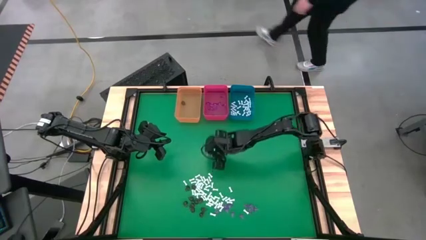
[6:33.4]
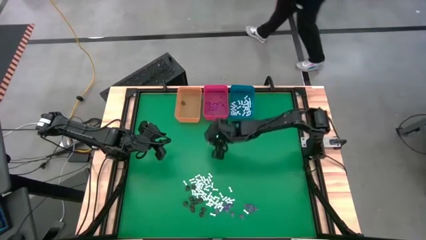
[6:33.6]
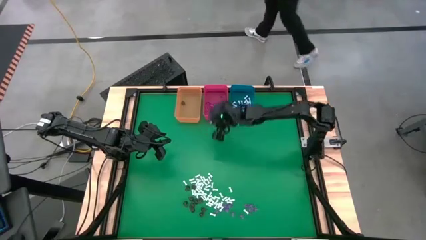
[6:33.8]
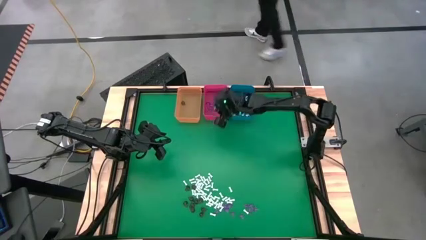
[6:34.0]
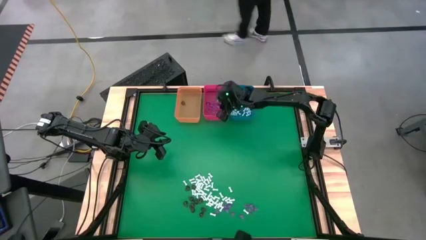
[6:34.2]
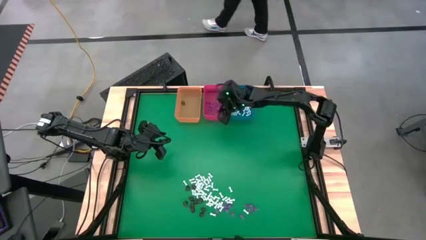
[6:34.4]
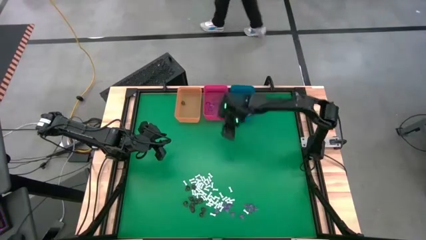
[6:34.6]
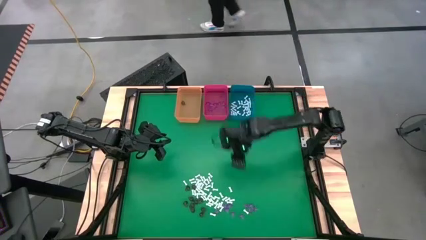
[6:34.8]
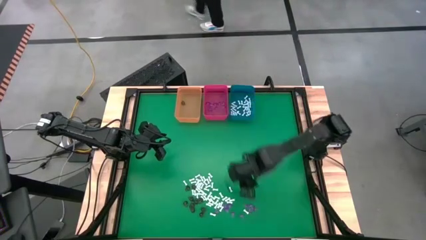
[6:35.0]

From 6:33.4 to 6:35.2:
Task: Sort Halloween decoration
Put the violet witch hat toy into the red bin

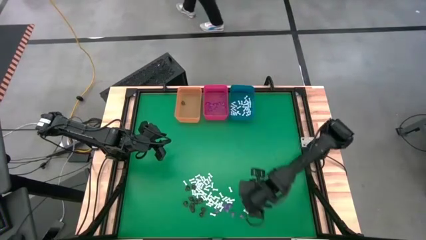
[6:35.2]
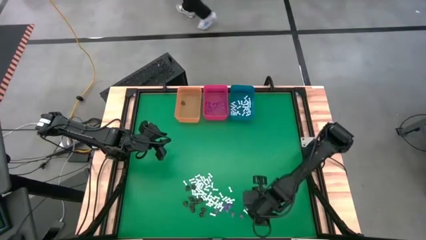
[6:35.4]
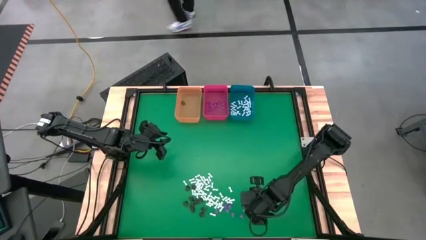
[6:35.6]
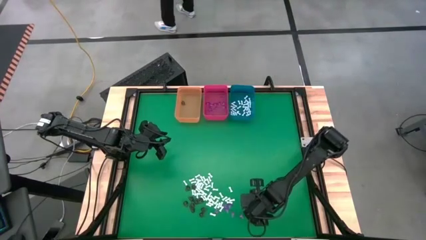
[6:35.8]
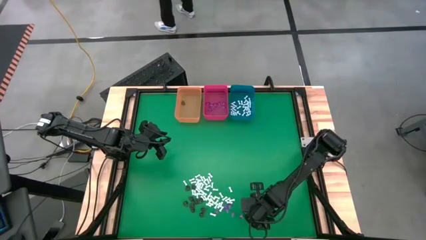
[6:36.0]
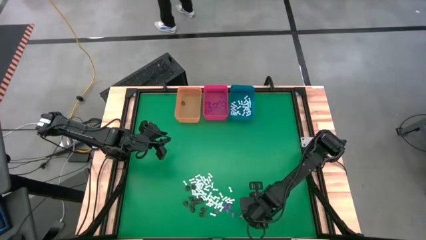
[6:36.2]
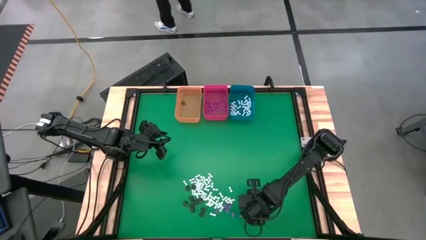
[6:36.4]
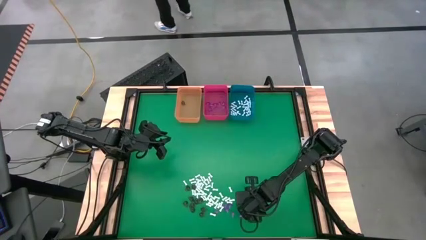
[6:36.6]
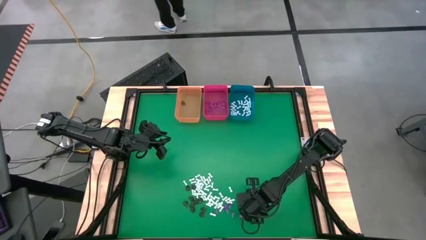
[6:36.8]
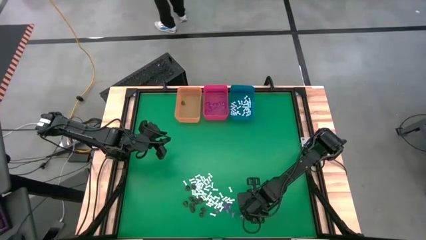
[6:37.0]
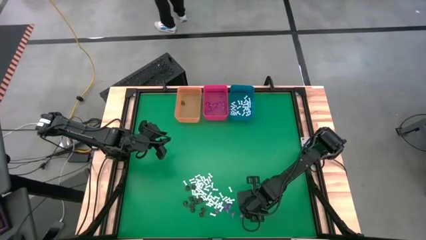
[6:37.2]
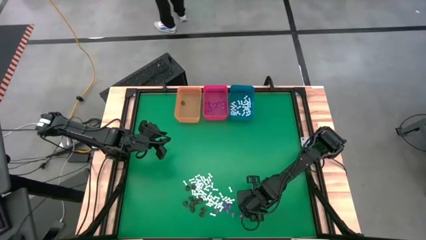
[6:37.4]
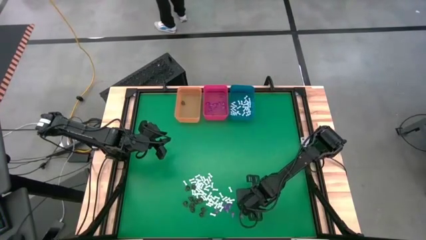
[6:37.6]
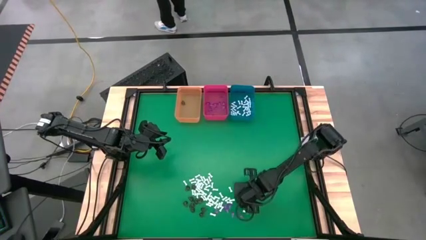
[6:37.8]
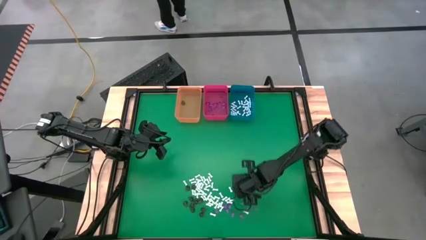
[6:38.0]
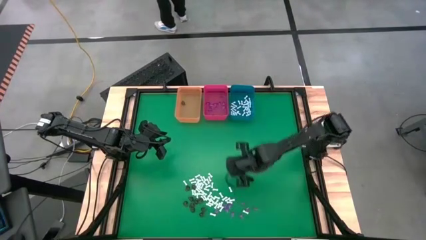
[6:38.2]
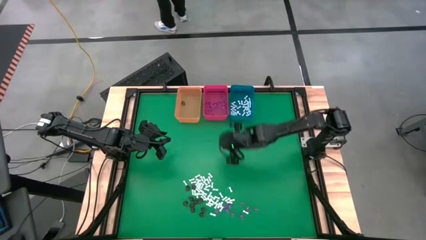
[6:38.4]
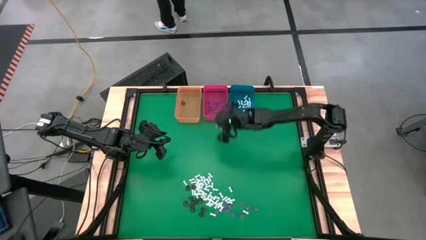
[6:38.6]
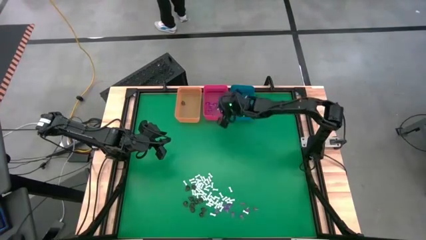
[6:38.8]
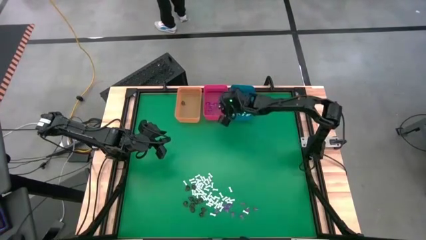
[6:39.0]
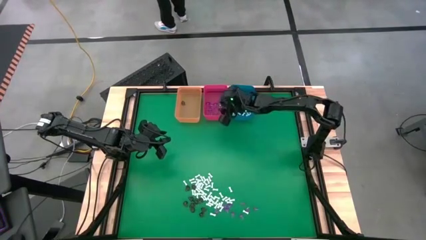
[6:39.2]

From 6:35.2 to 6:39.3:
Put the violet witch hat toy into the red bin

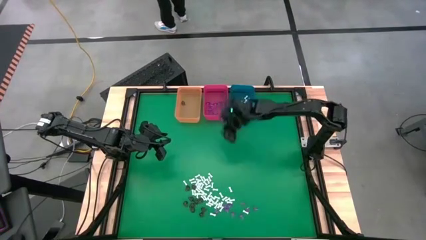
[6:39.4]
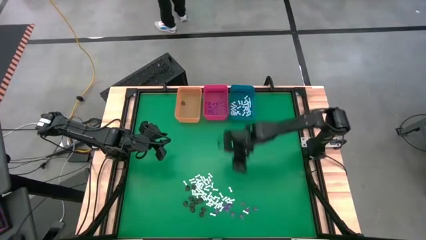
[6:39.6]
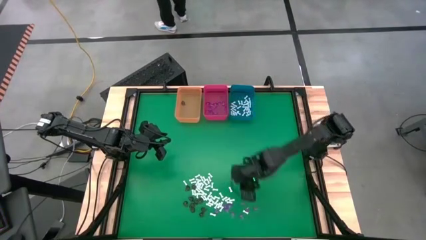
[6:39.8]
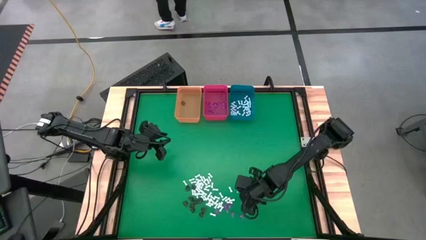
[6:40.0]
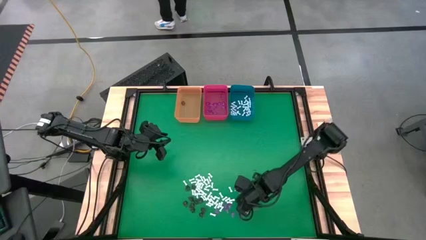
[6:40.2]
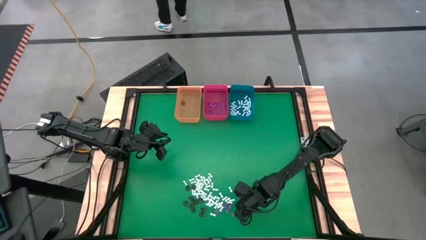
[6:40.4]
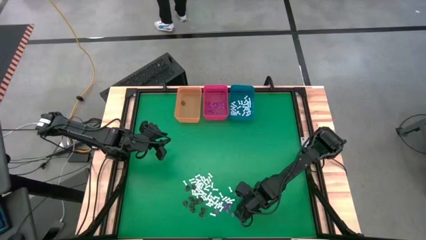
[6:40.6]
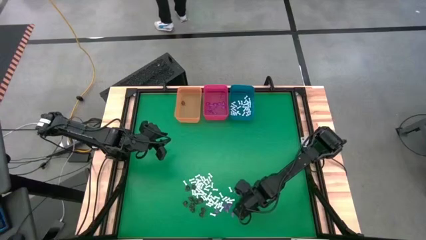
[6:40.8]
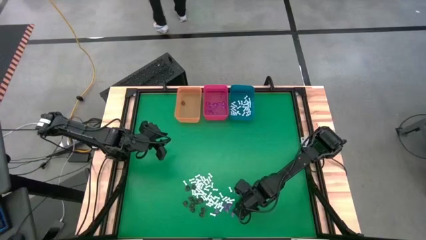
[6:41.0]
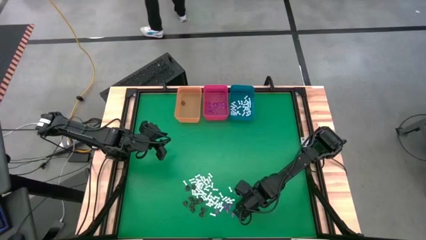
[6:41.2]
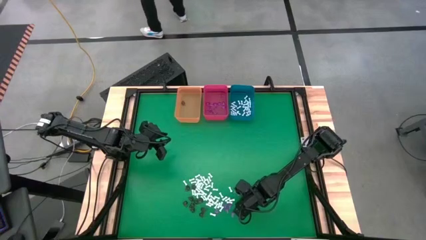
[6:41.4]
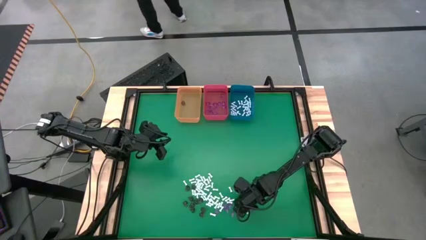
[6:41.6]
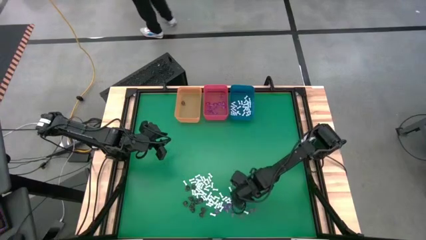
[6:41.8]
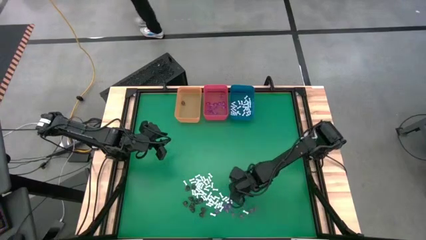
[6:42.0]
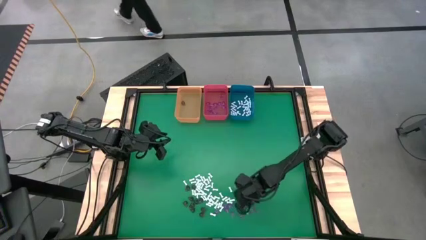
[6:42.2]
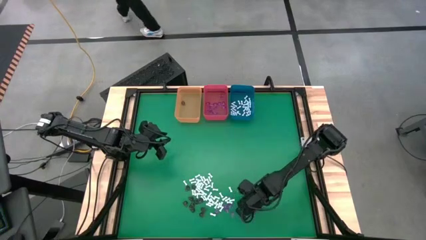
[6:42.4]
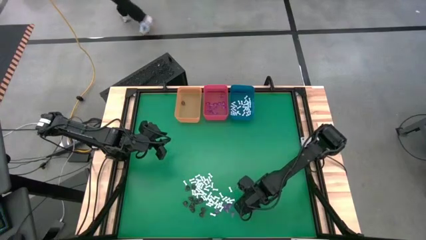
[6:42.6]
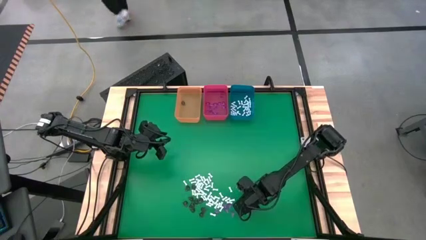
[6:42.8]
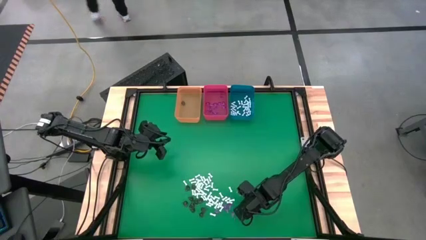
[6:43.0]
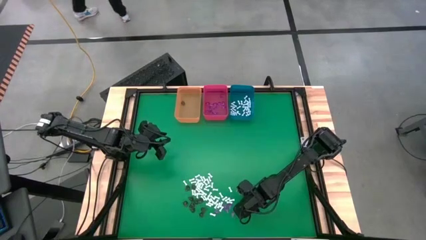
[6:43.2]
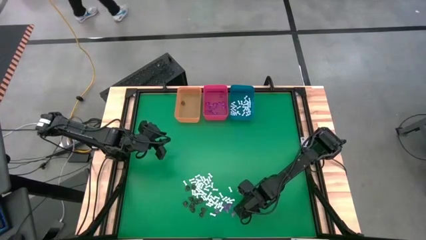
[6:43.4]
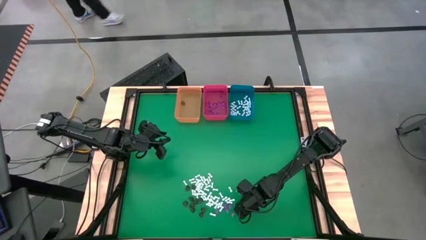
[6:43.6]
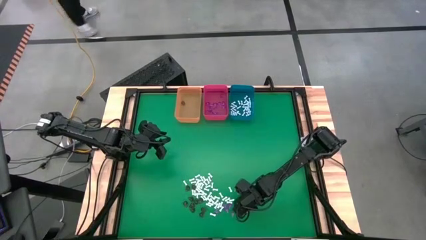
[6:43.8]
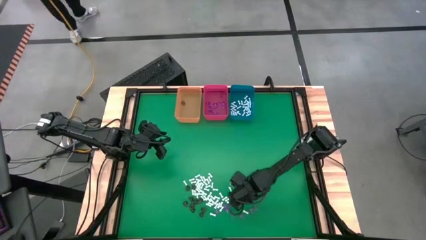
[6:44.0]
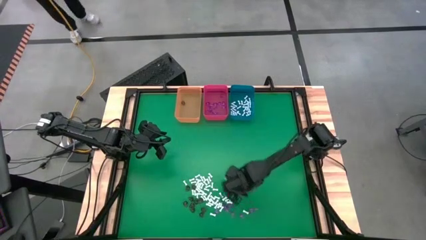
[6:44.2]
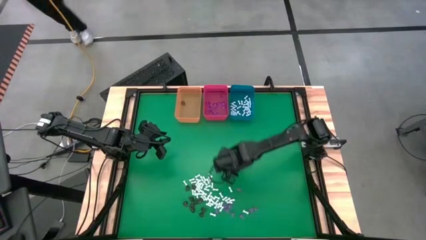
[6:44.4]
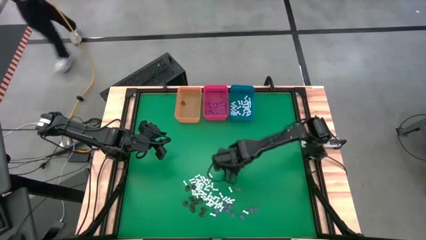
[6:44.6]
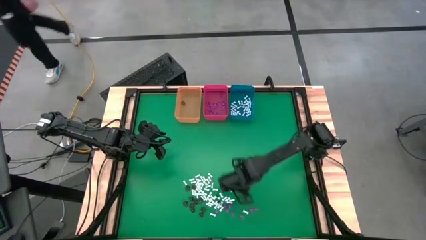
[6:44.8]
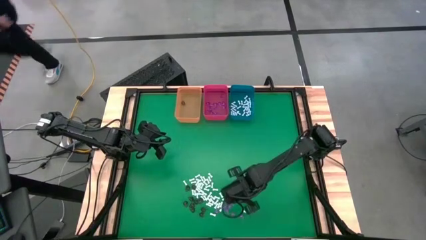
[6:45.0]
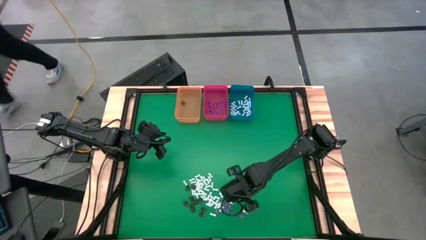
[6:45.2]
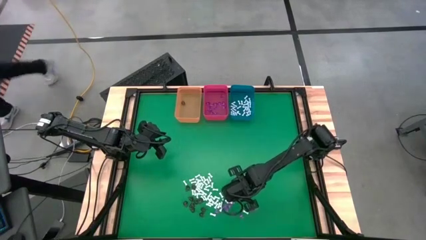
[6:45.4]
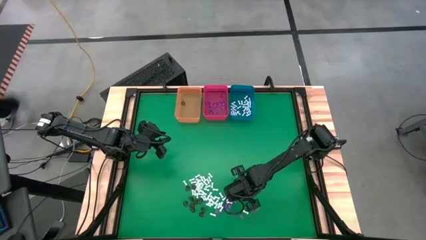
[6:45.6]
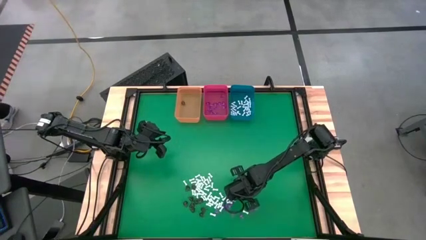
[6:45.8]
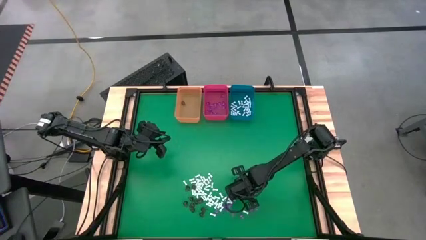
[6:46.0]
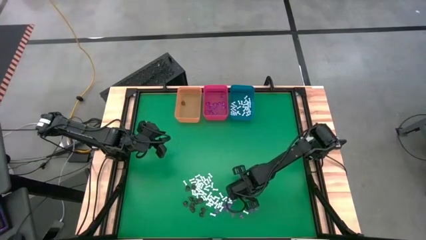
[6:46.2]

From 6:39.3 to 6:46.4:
Put the violet witch hat toy into the red bin

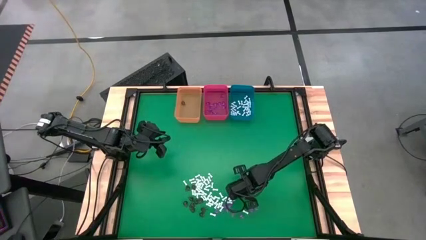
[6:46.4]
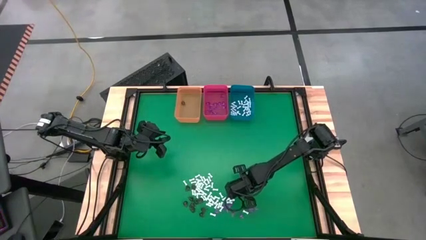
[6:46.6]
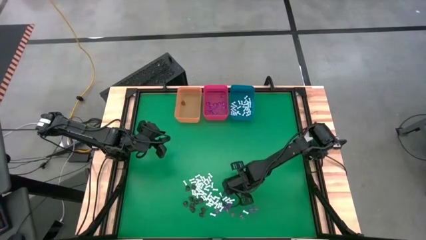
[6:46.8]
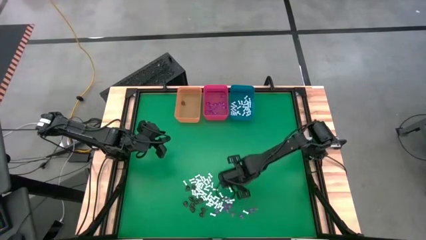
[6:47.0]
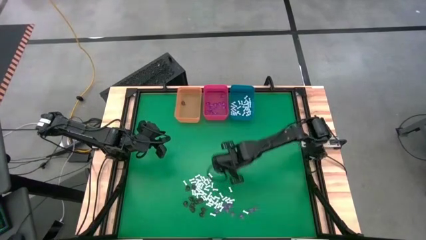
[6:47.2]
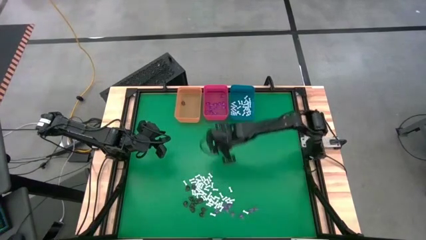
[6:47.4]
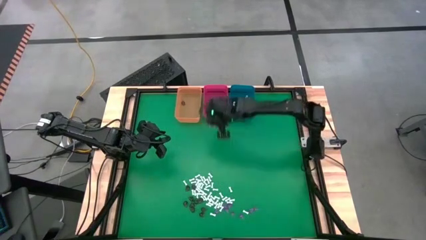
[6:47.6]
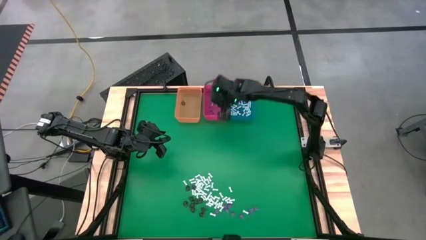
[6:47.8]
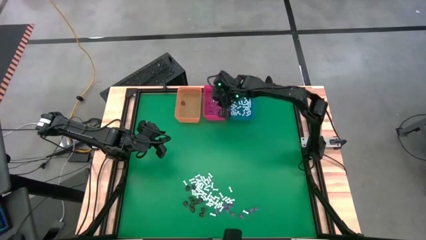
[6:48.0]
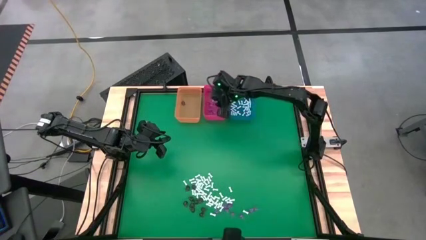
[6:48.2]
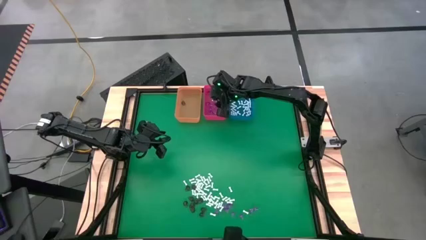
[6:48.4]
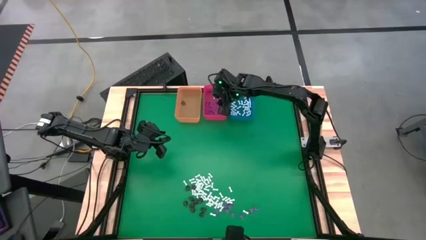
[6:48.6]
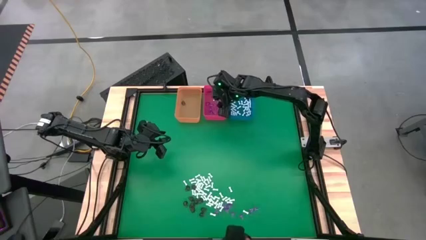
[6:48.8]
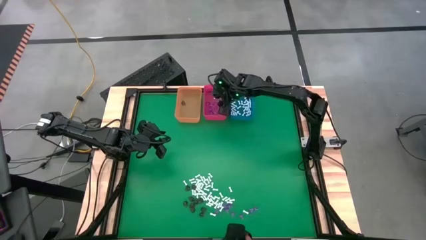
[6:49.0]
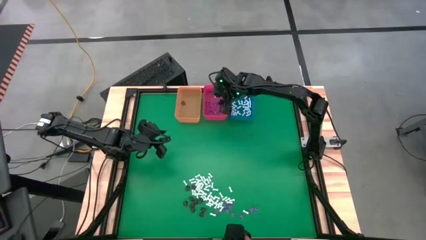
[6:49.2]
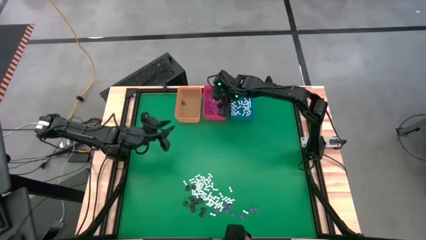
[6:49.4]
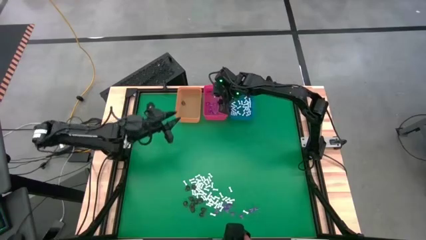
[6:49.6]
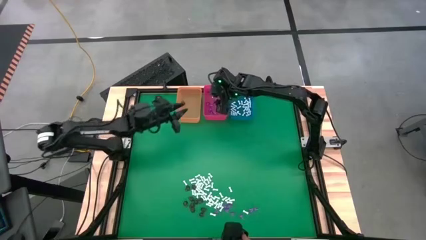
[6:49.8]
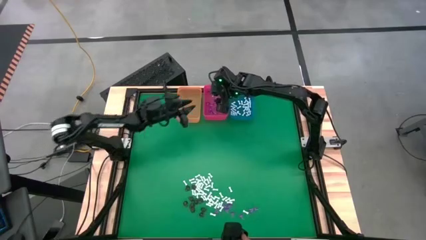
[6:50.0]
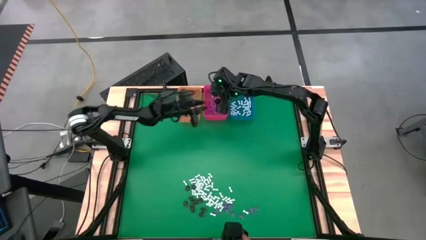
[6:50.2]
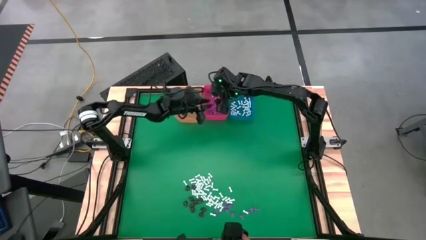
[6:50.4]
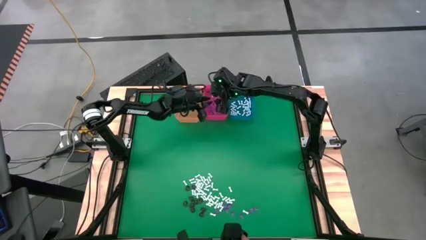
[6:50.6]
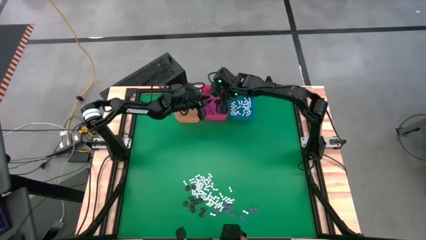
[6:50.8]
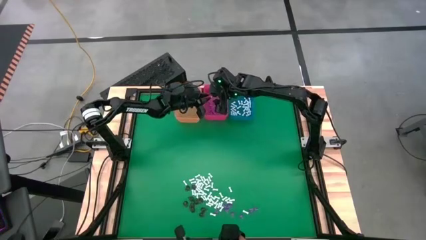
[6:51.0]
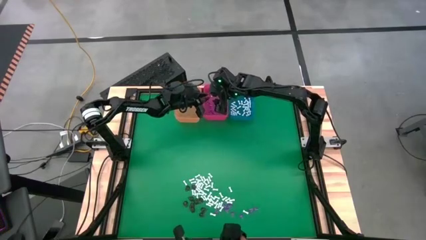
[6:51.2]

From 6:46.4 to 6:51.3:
Put the violet witch hat toy into the red bin
